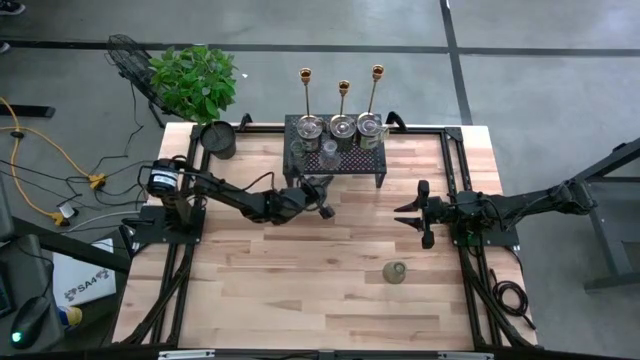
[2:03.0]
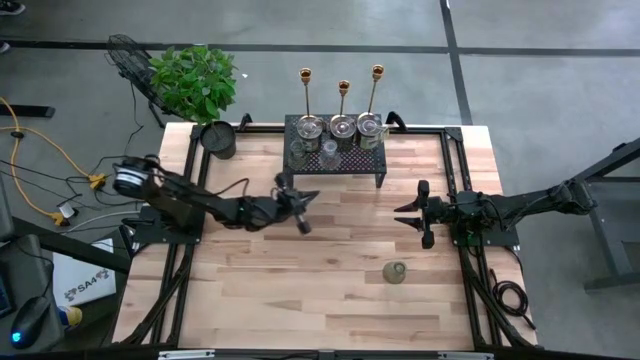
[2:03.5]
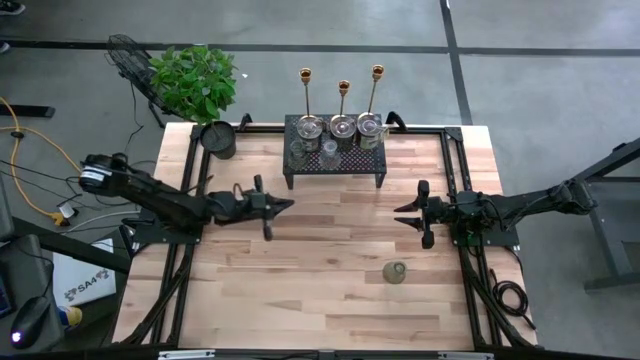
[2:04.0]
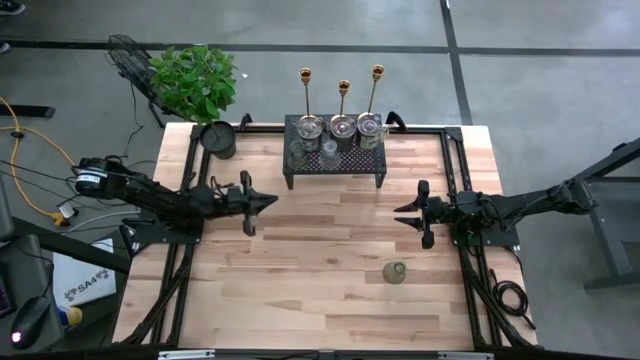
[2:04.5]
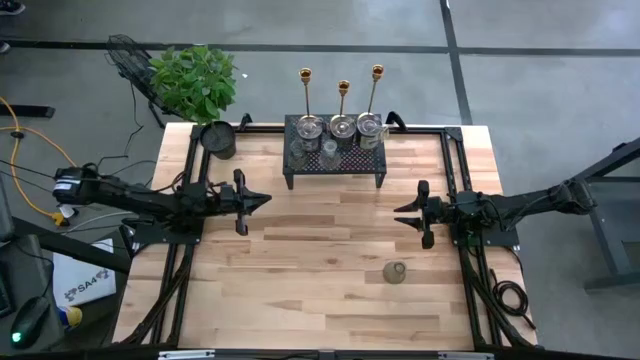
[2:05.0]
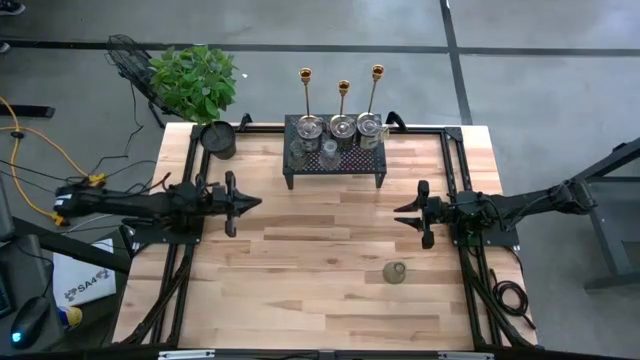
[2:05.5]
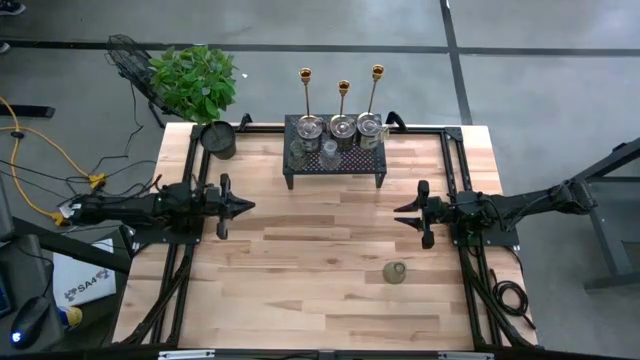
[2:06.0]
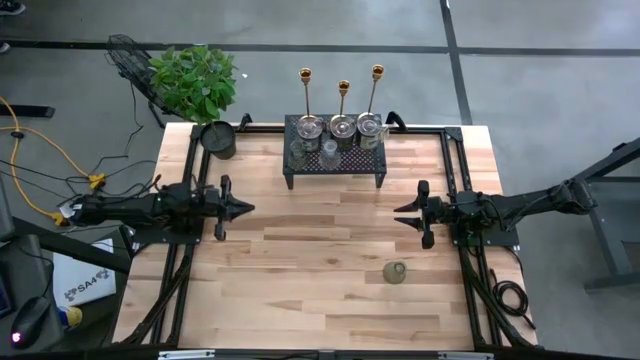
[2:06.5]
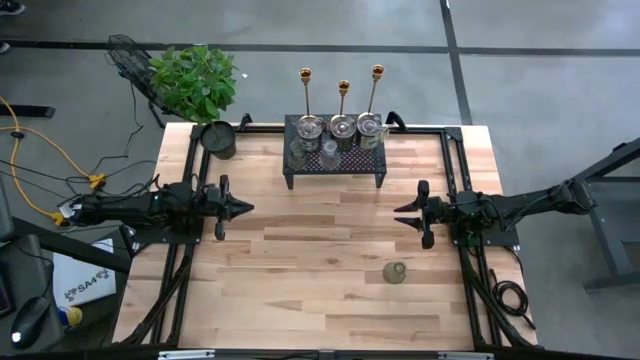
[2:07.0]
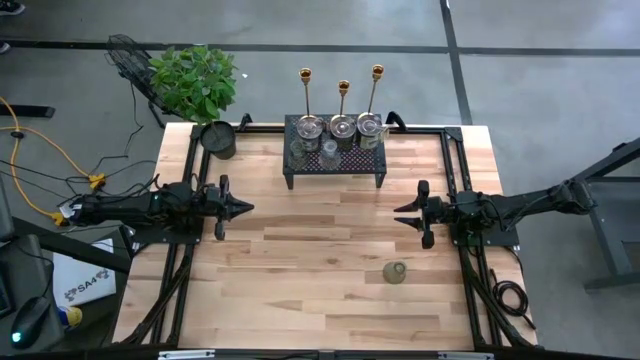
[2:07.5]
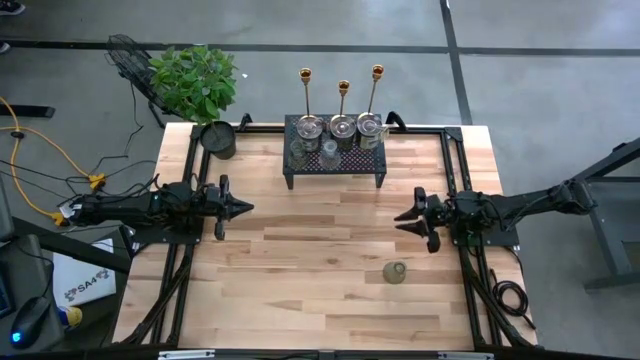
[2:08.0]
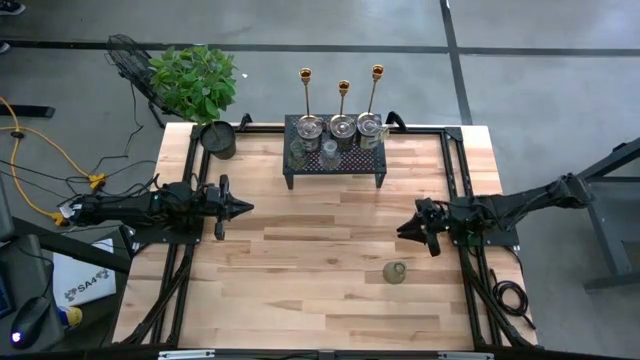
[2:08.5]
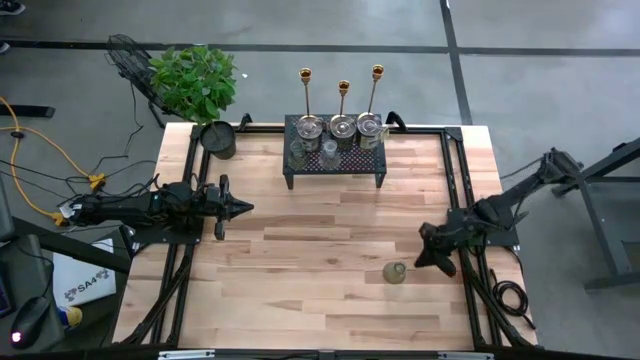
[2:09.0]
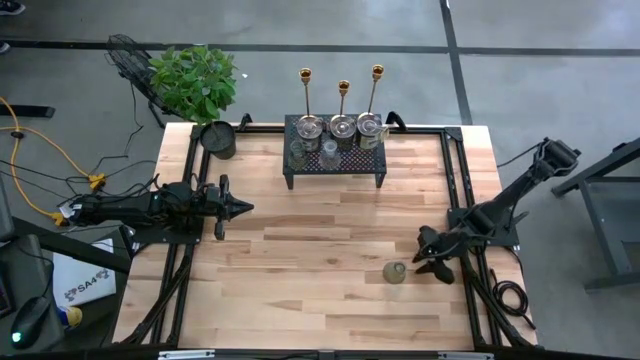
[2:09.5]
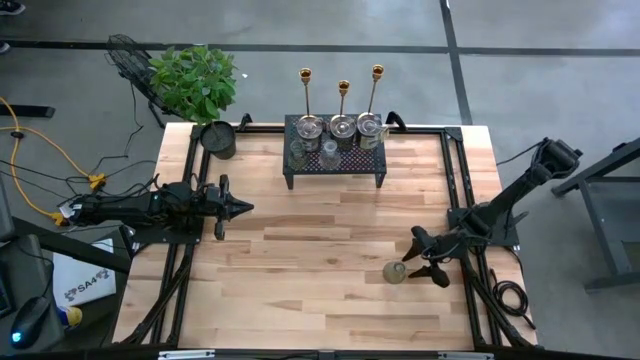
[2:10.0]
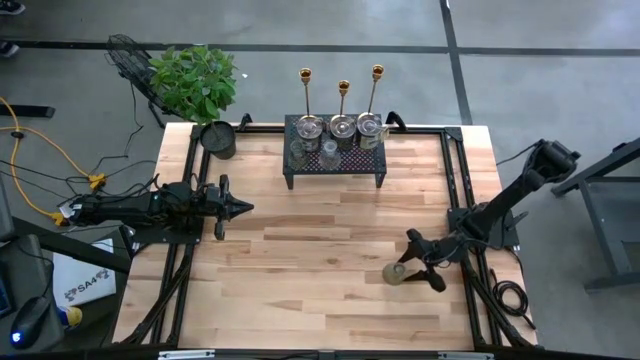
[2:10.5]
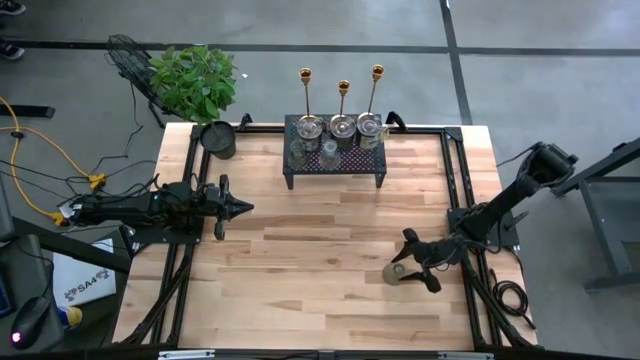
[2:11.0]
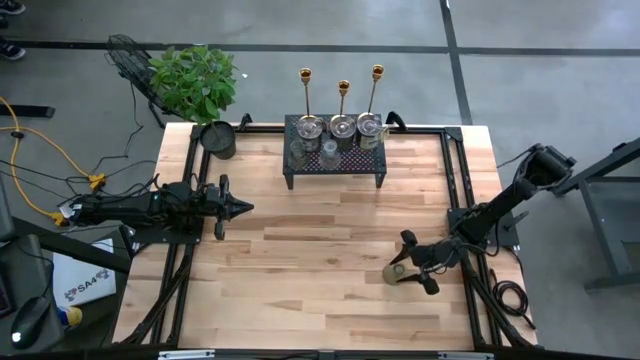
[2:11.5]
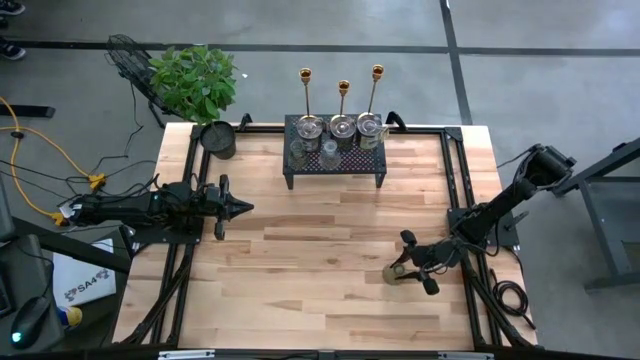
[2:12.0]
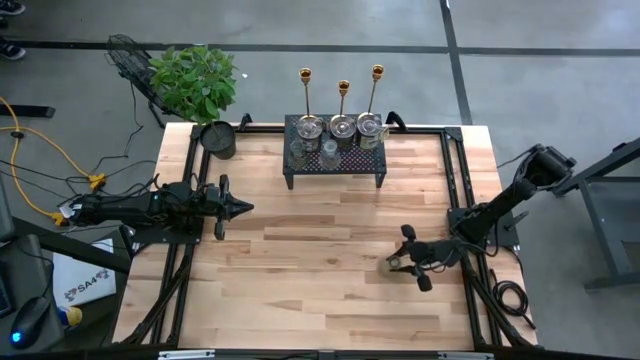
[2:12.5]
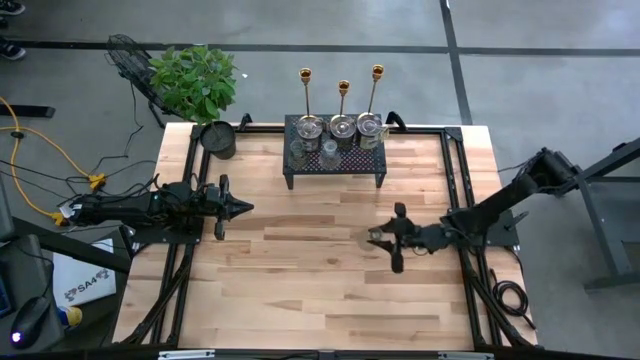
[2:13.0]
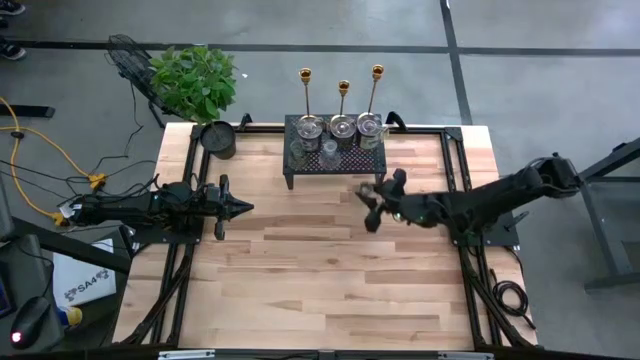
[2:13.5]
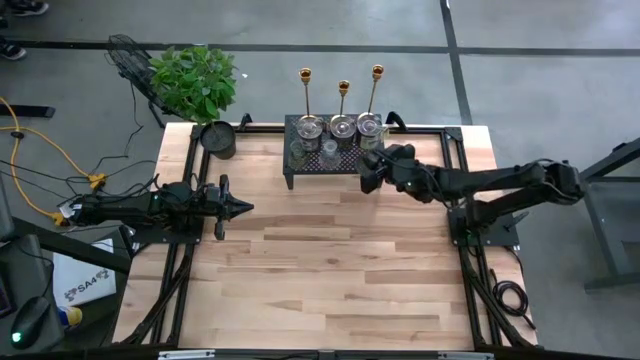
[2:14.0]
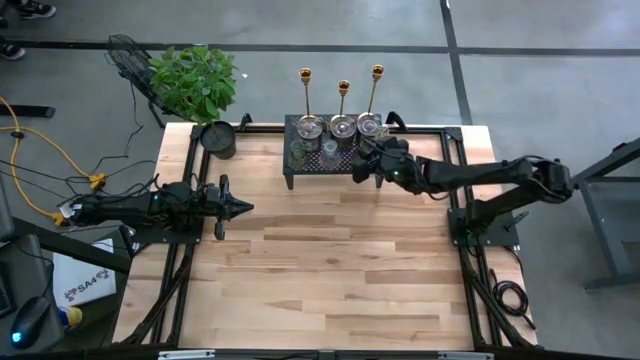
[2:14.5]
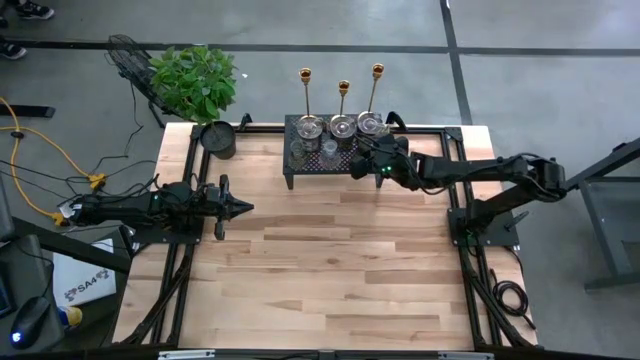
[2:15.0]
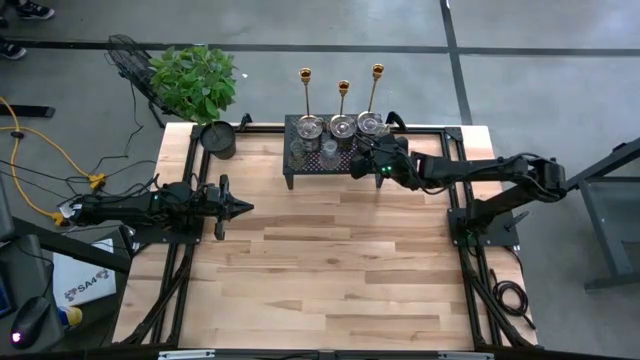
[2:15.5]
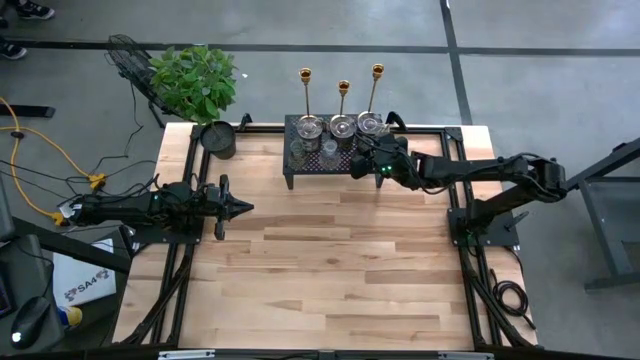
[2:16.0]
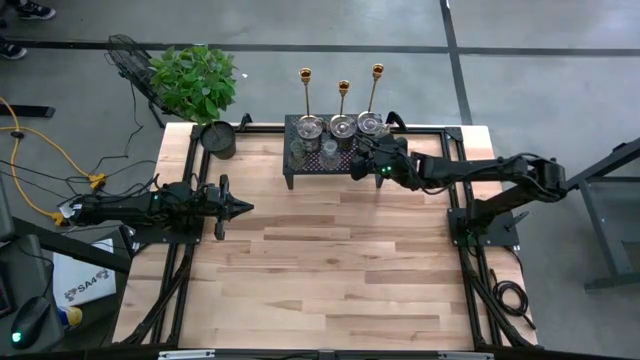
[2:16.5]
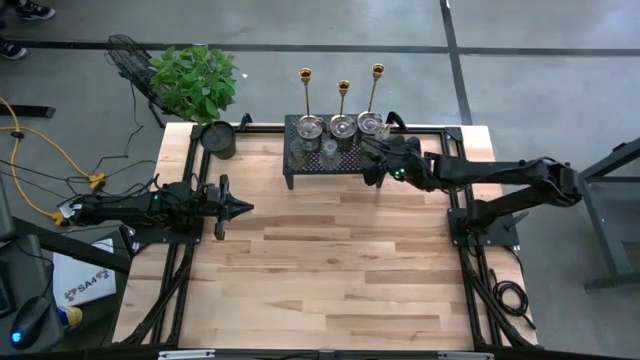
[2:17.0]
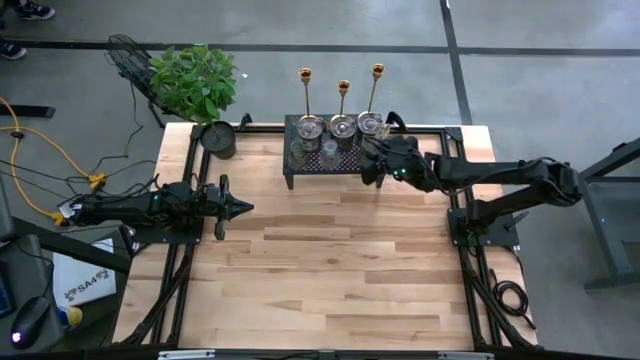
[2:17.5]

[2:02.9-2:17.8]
Task: Pick & Place candle stick holders
Put the green glass candle holder on the shelf

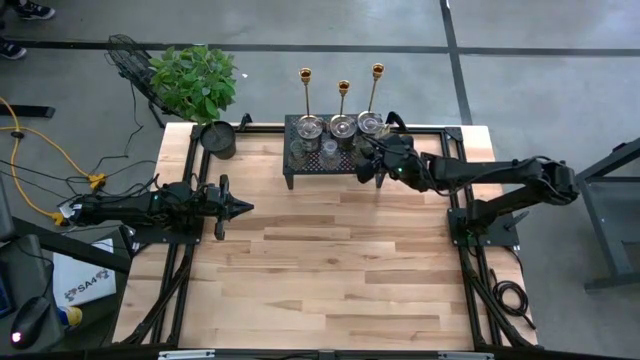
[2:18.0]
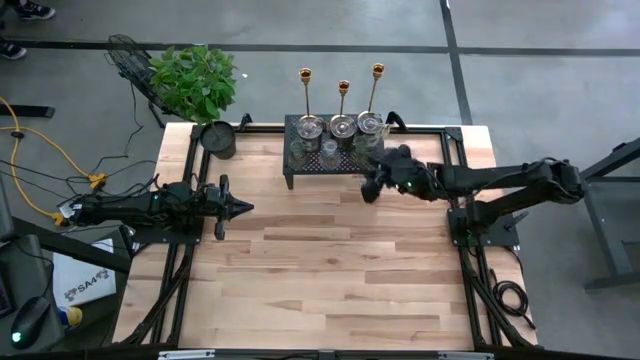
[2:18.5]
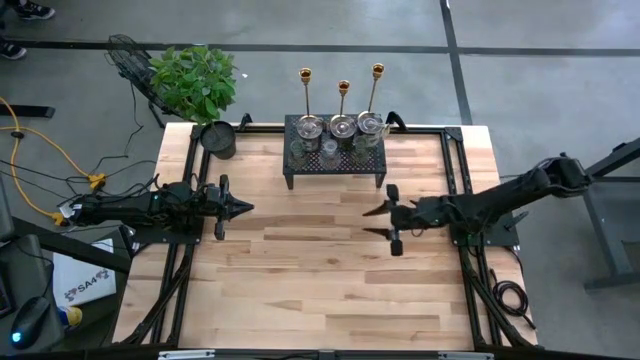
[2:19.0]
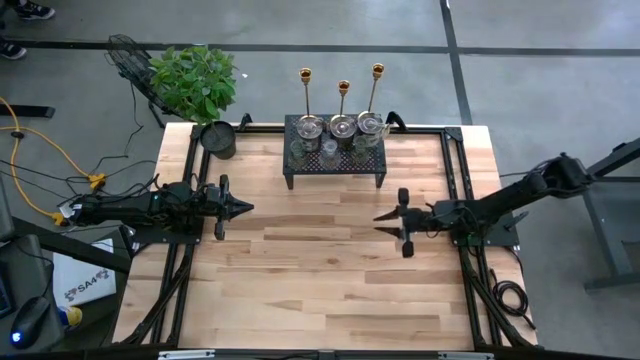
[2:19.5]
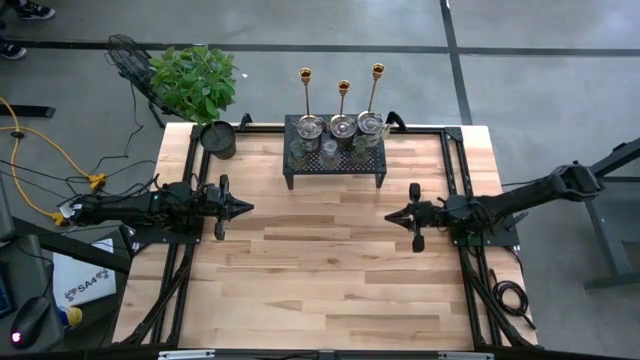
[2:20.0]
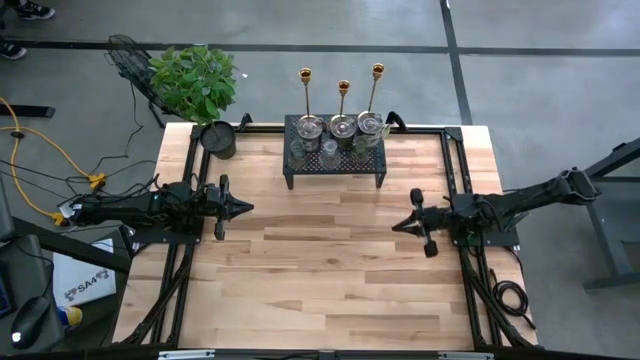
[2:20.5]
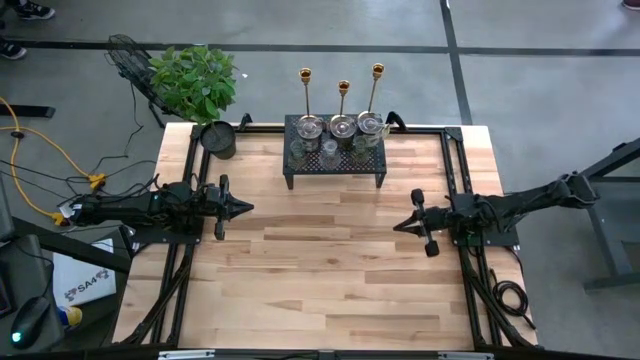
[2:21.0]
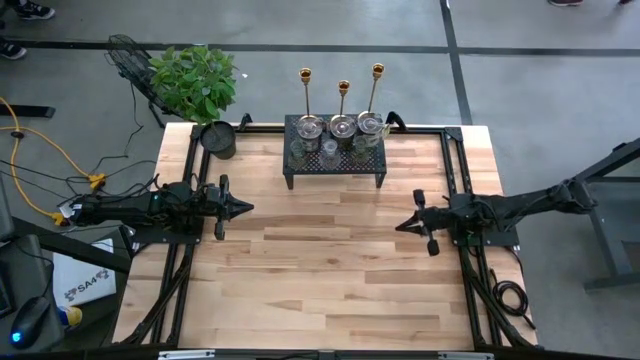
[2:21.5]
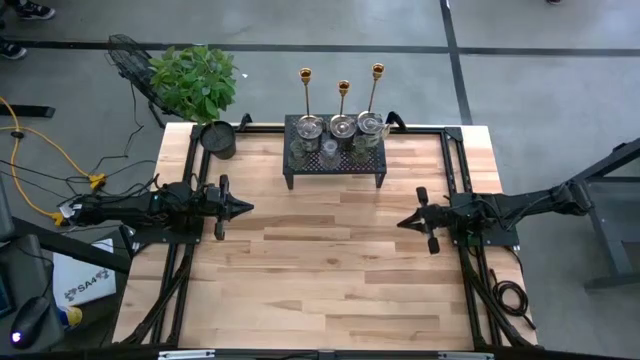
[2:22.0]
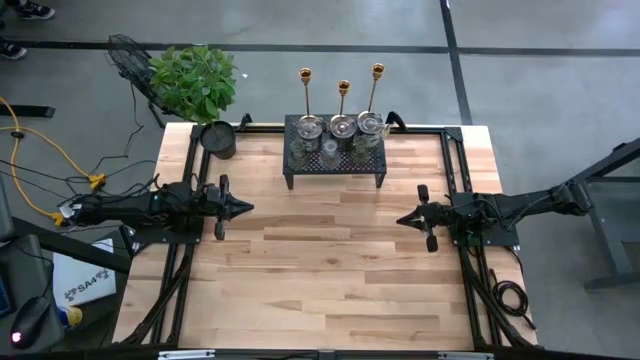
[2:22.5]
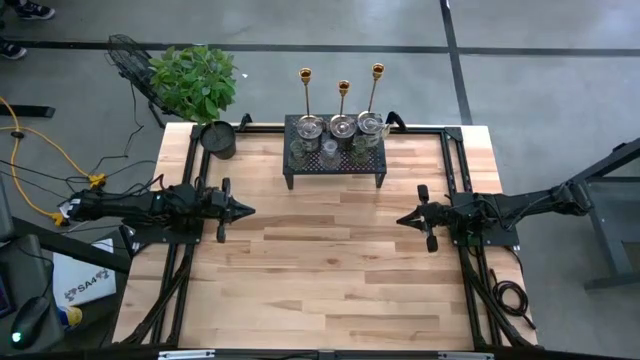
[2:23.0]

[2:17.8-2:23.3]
Return to Home Position
